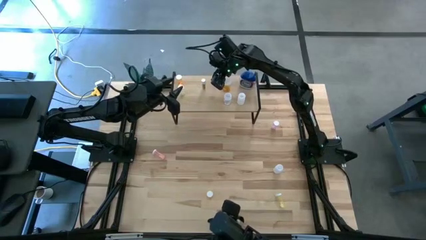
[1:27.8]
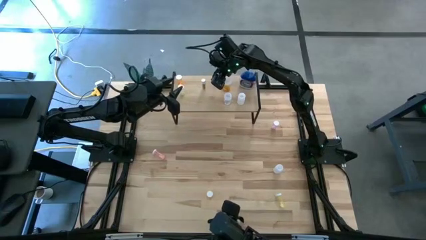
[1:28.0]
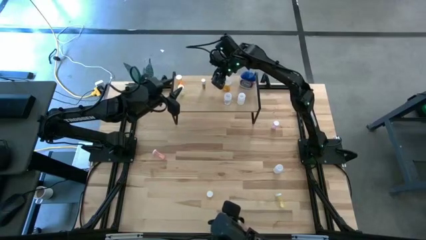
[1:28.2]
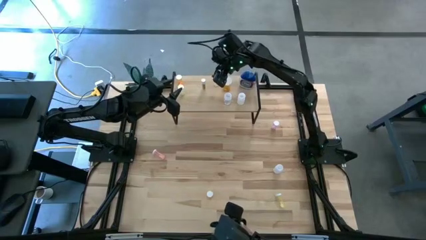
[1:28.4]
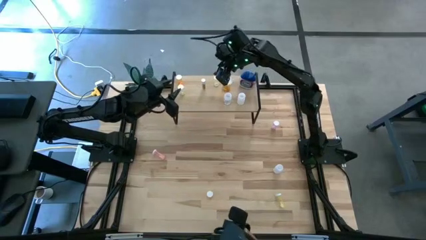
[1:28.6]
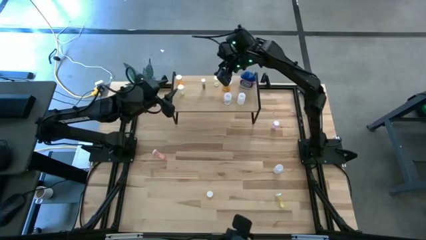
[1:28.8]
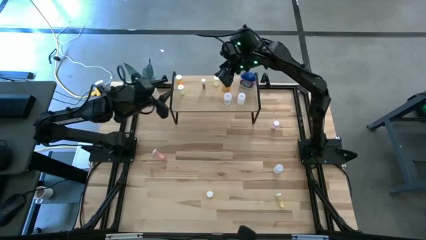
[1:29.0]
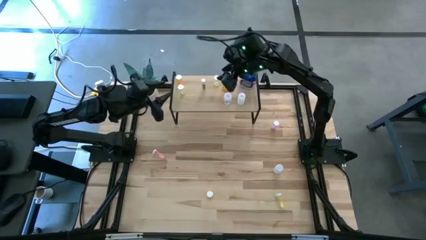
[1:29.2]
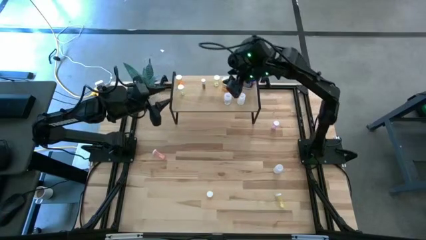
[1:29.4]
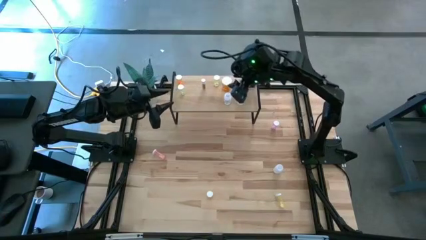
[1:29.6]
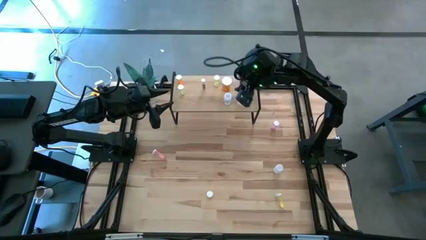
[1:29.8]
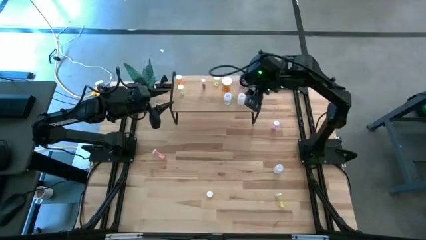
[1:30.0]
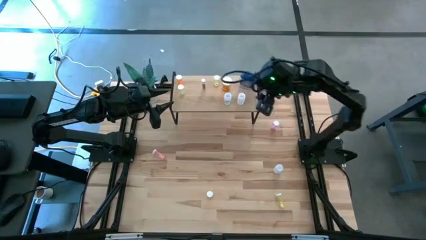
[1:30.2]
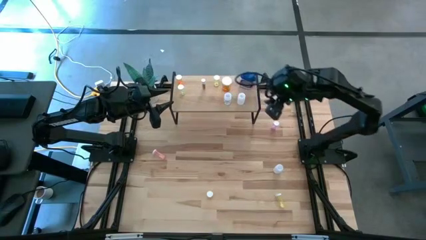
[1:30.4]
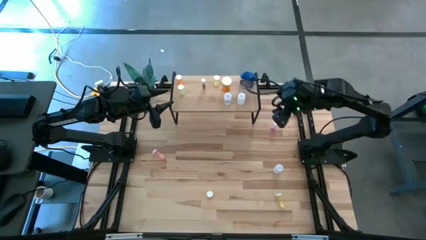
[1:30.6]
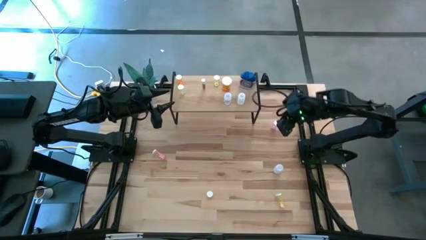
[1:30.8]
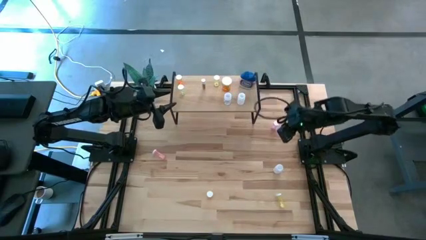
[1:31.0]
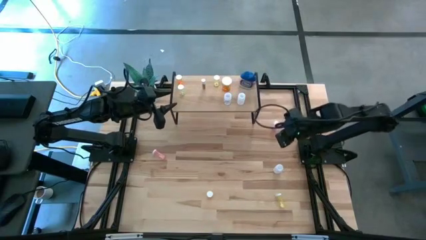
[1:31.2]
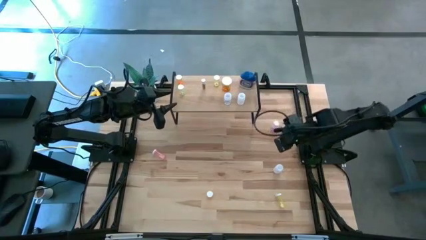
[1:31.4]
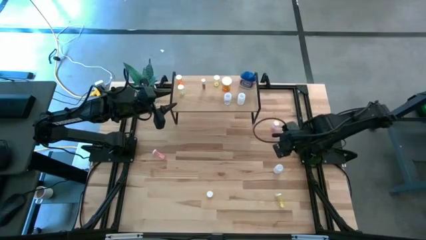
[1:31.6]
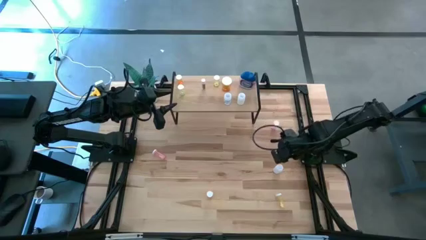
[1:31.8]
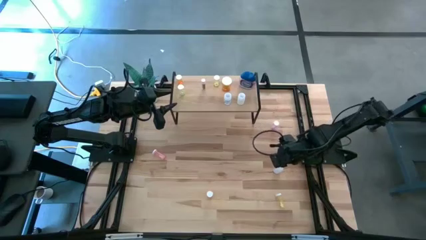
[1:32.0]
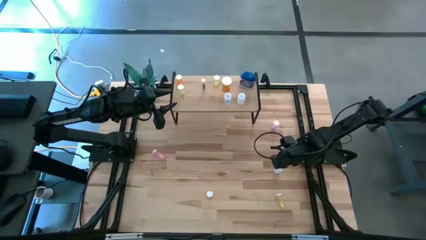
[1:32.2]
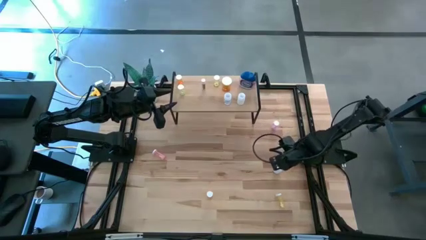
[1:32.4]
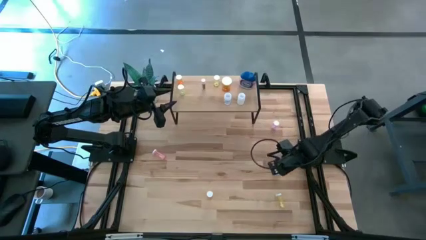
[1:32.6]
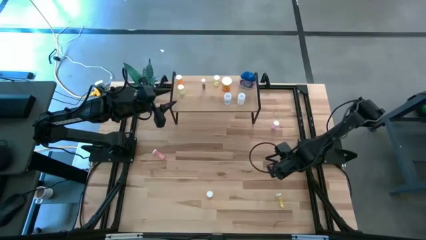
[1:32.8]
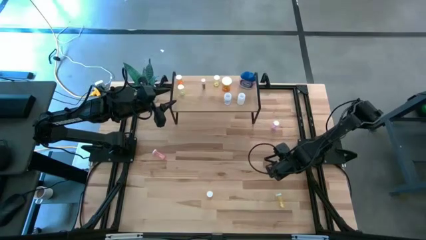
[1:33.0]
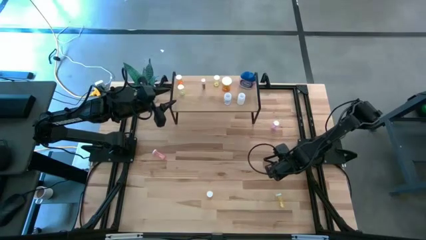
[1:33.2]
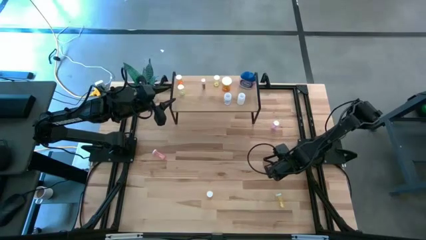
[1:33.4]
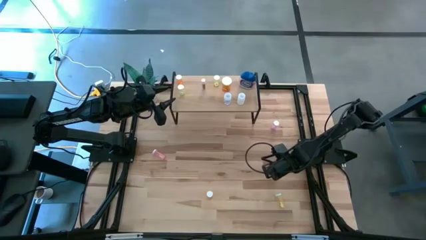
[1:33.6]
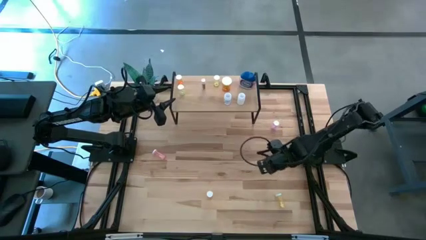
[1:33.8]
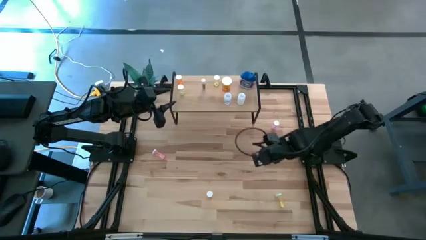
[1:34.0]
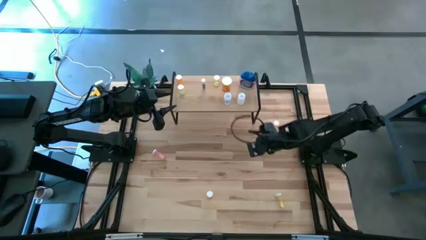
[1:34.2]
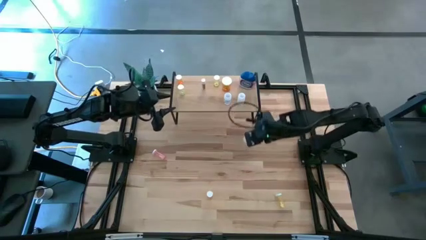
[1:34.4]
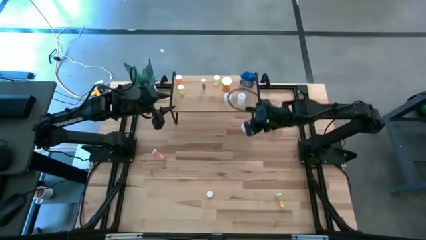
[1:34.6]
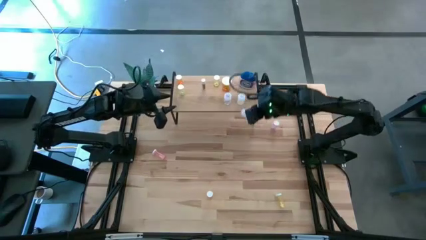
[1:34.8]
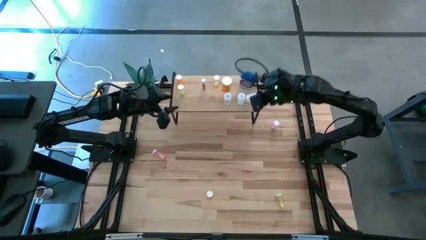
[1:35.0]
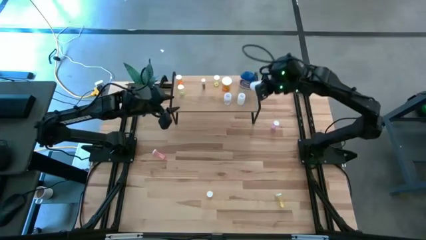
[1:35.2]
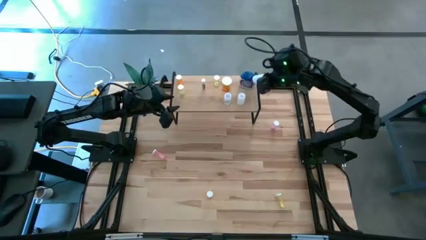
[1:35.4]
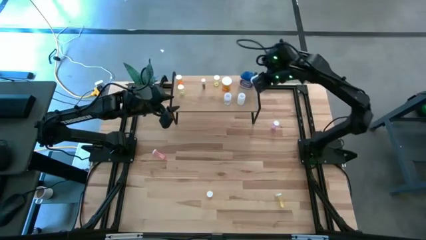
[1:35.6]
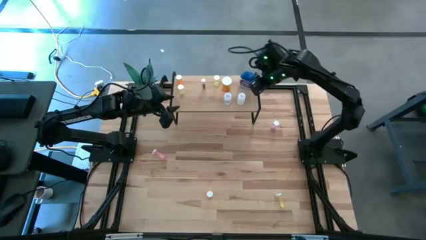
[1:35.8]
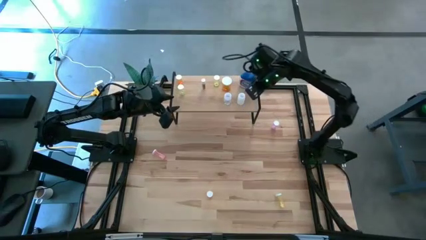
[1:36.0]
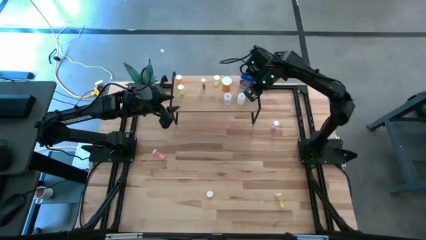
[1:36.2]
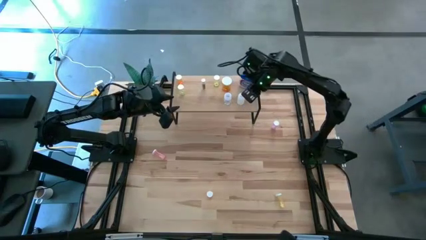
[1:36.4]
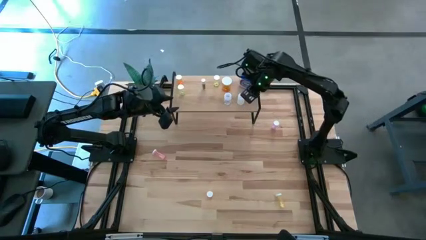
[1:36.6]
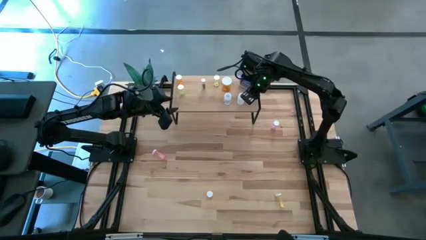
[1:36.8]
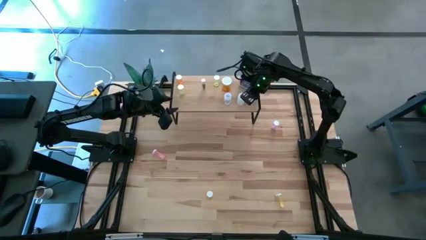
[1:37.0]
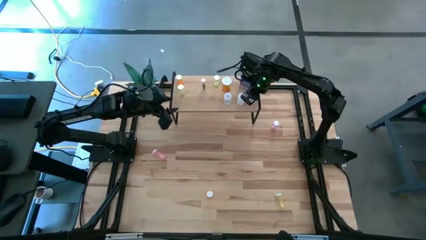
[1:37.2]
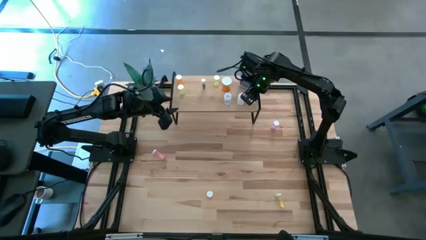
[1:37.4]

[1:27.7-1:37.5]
Task: Pick and place medicine bottles onto shelf by color
Put the white pill bottle on the shelf

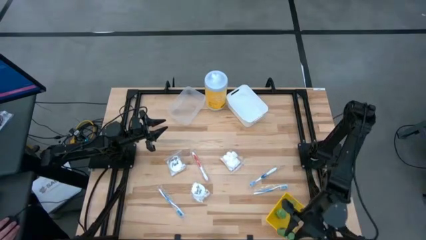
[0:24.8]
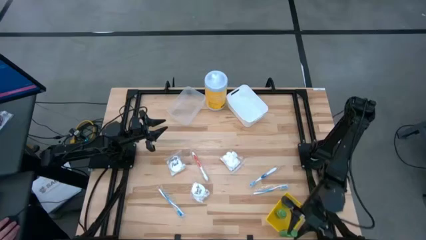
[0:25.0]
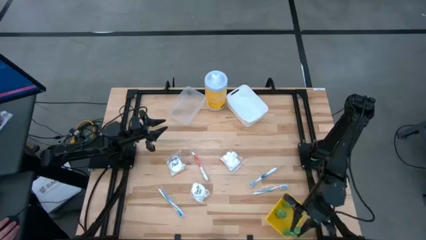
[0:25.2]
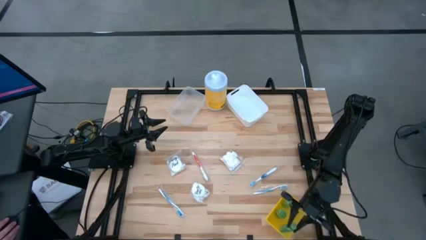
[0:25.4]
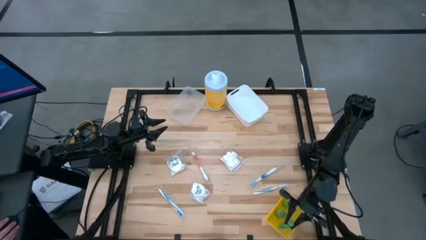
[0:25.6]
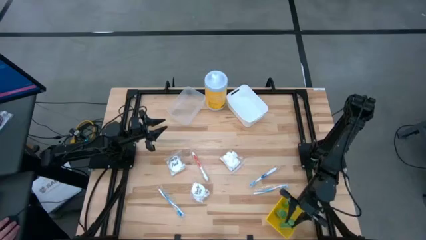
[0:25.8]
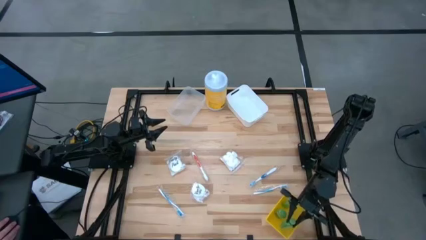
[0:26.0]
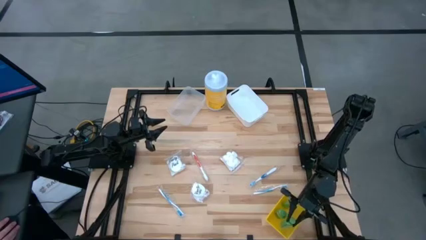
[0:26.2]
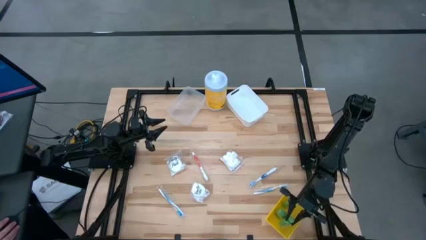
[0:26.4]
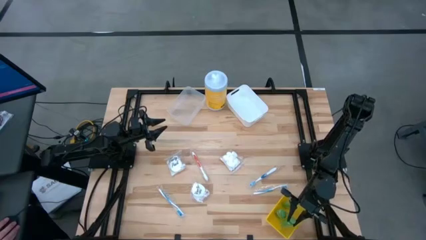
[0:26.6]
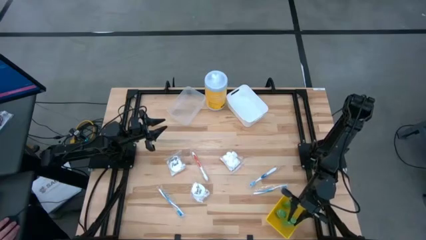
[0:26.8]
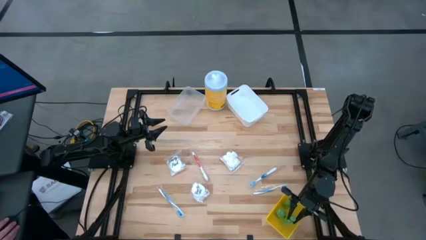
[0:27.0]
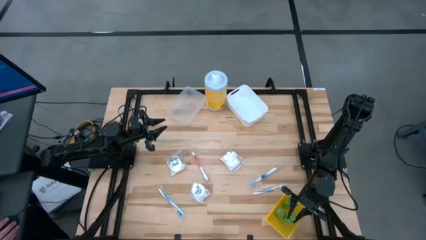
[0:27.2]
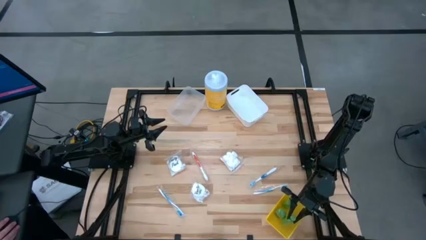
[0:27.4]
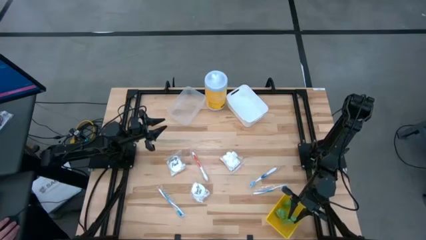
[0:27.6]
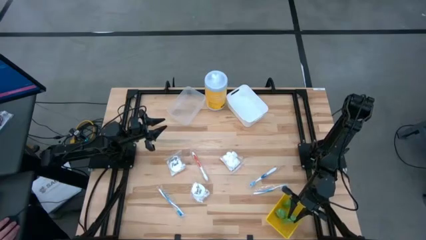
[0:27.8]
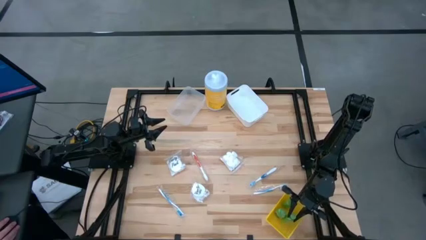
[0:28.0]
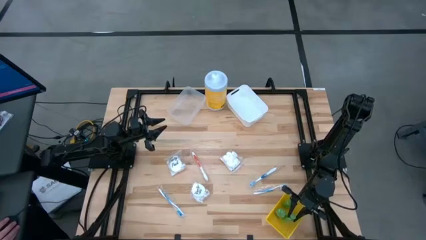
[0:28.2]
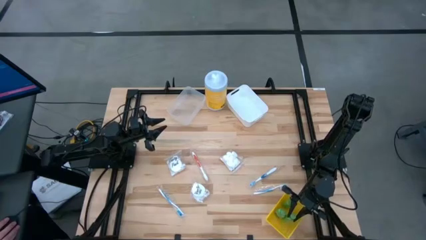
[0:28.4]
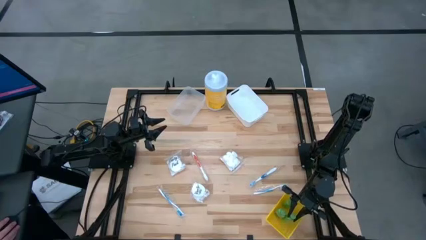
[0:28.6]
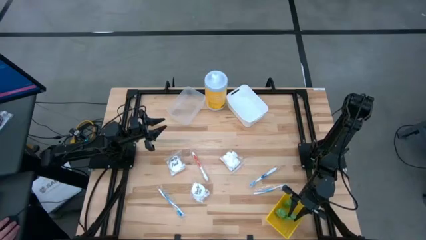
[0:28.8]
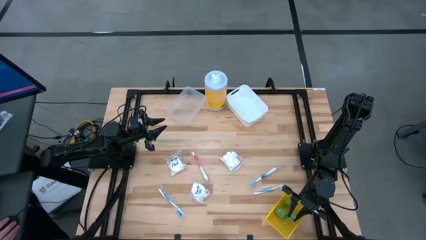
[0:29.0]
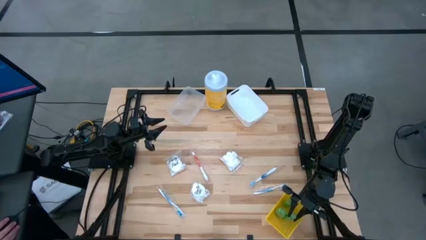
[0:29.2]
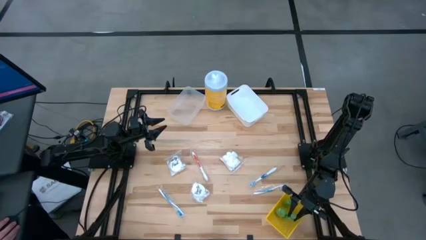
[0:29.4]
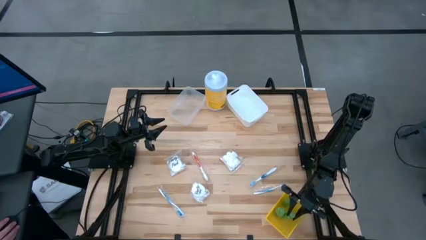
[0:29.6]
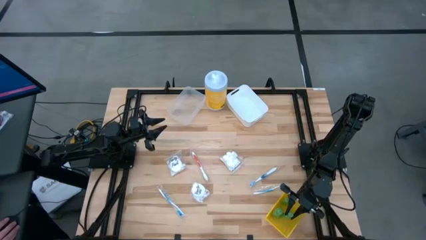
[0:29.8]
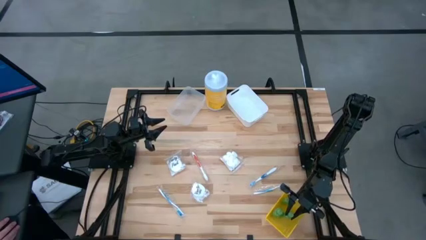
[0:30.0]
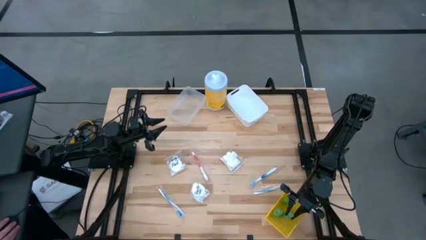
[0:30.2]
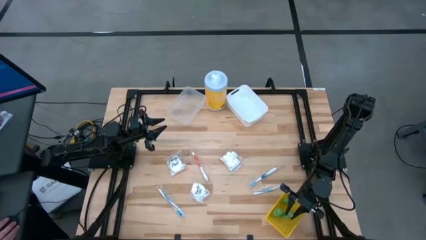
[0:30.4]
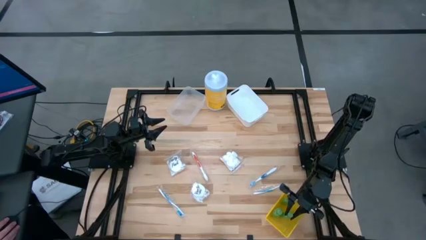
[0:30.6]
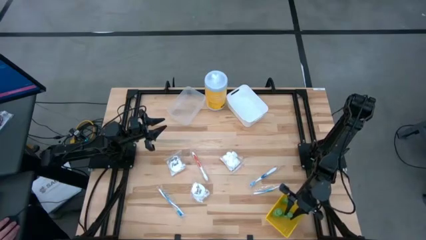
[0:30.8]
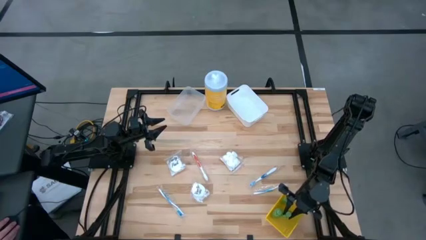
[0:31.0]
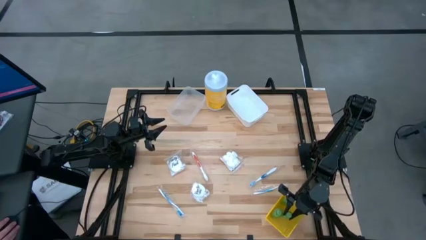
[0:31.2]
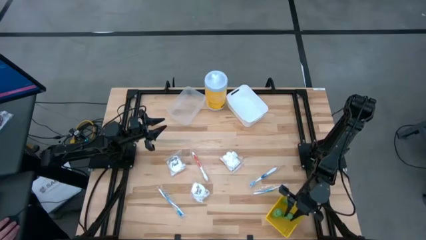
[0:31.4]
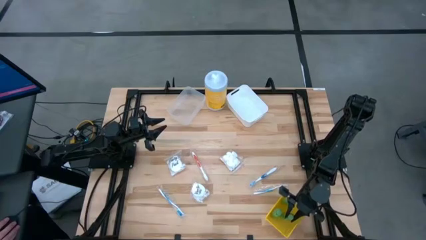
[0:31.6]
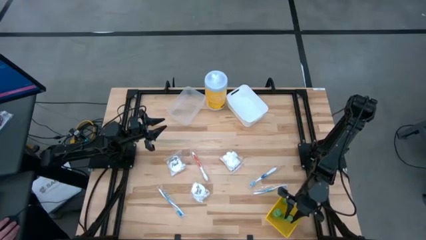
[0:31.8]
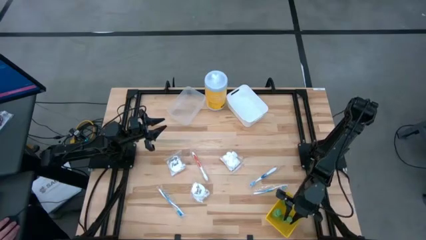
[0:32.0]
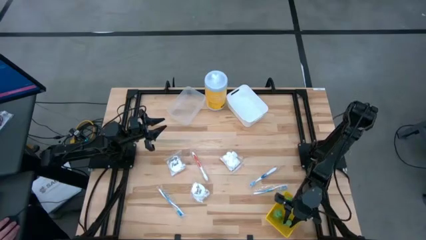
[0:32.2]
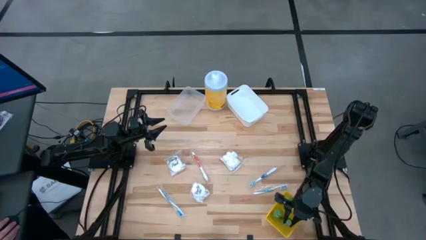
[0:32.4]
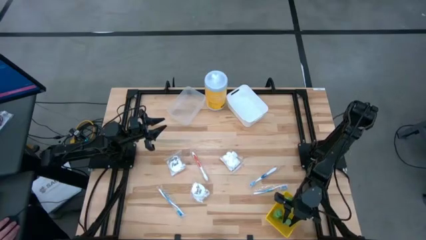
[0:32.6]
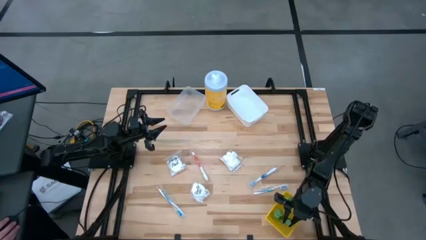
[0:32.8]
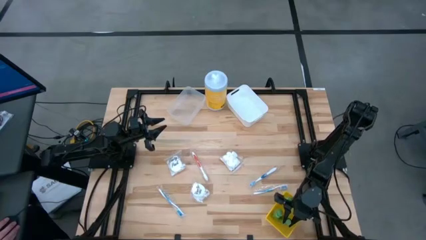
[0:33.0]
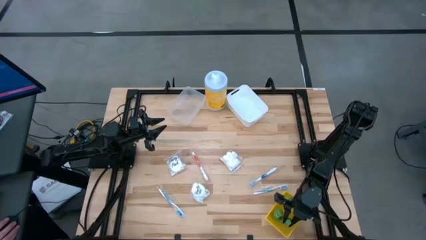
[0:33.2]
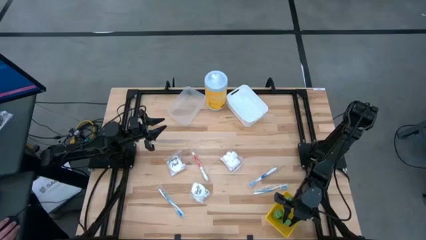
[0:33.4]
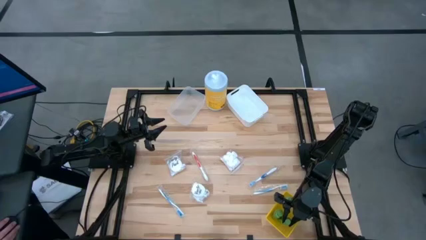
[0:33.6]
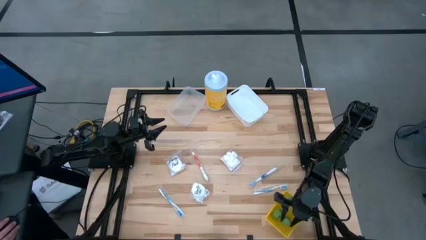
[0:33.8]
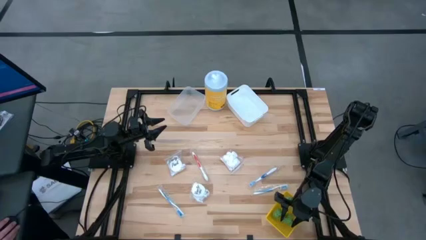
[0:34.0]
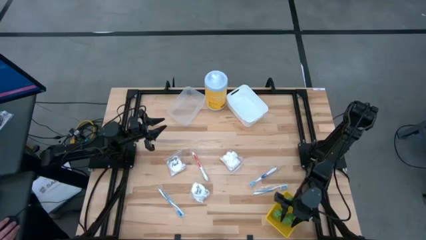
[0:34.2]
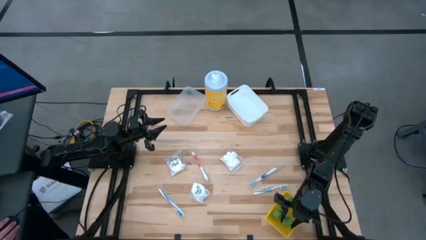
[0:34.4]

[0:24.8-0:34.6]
Task: Pick & Place Travel size toiletries
Put the shampoo into the yellow bin
